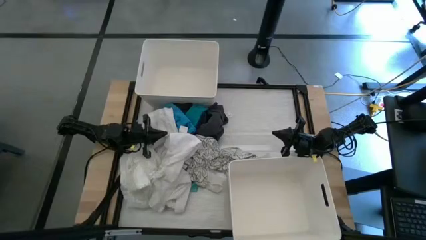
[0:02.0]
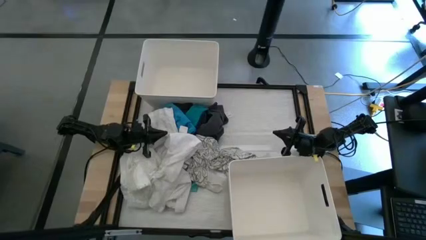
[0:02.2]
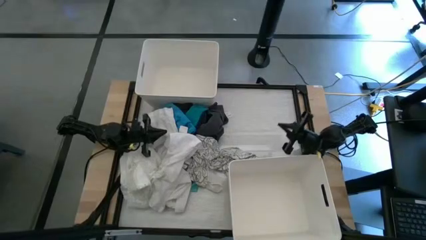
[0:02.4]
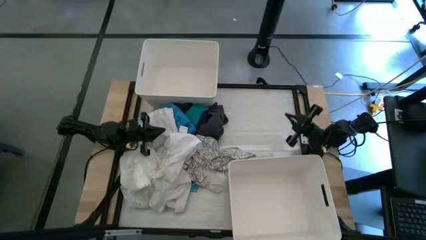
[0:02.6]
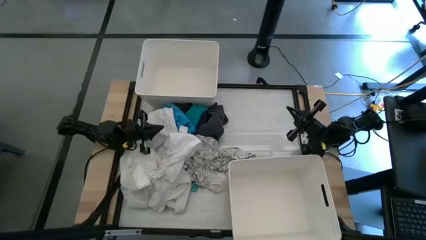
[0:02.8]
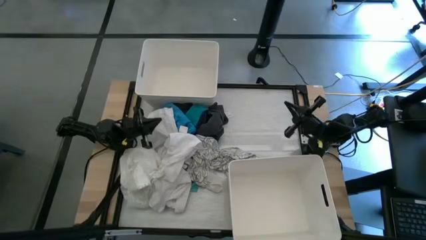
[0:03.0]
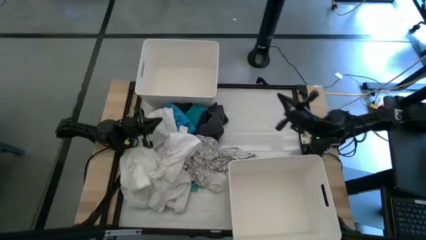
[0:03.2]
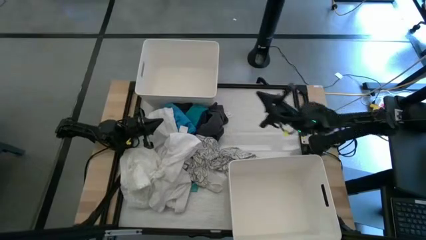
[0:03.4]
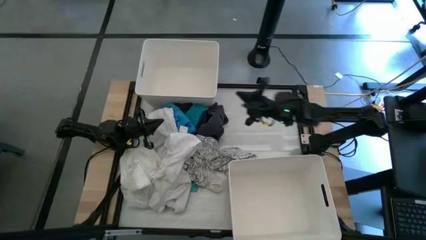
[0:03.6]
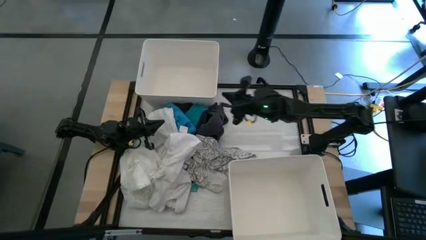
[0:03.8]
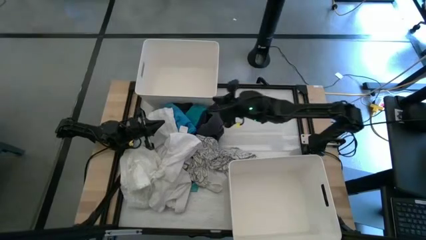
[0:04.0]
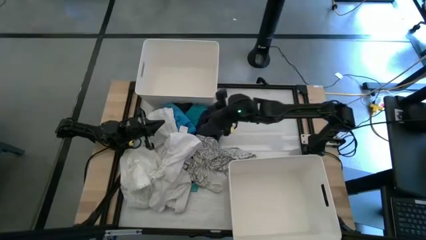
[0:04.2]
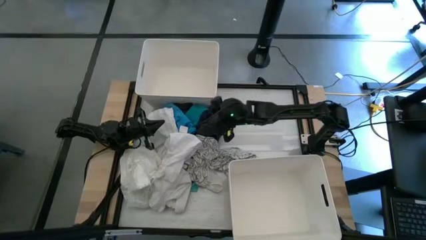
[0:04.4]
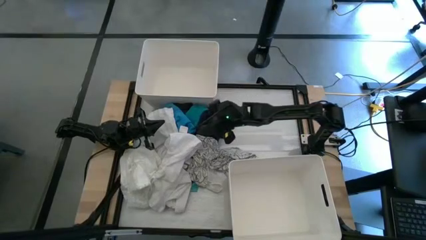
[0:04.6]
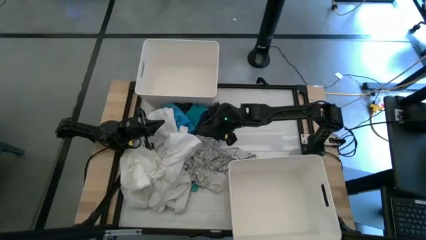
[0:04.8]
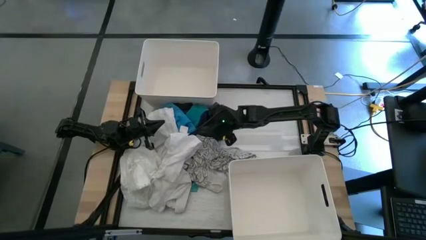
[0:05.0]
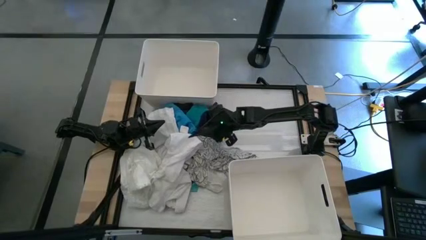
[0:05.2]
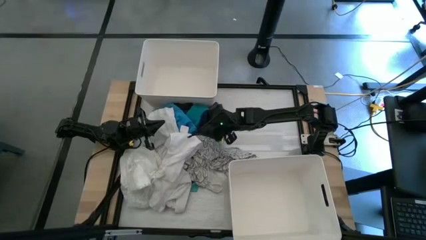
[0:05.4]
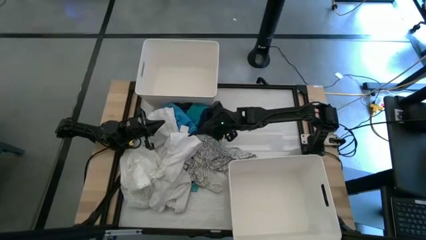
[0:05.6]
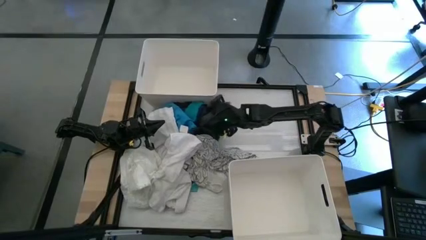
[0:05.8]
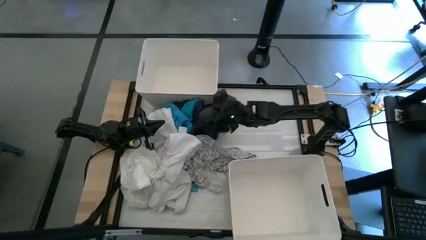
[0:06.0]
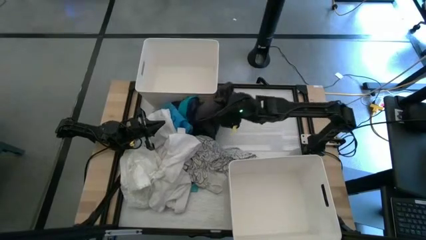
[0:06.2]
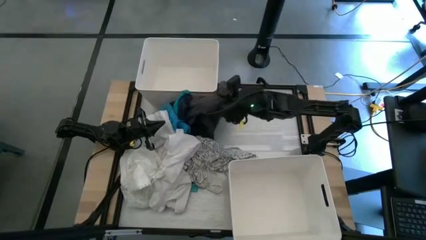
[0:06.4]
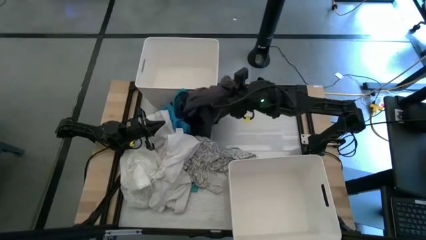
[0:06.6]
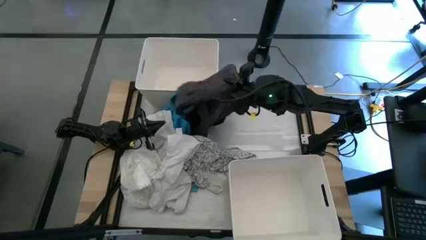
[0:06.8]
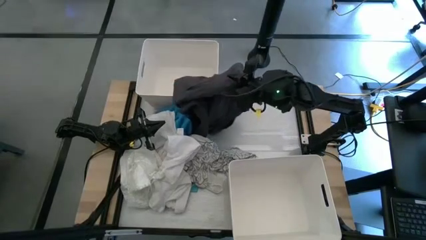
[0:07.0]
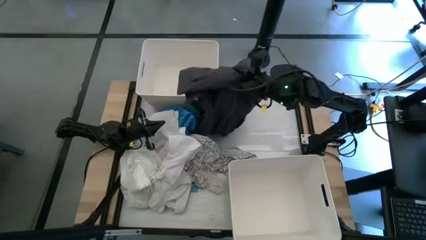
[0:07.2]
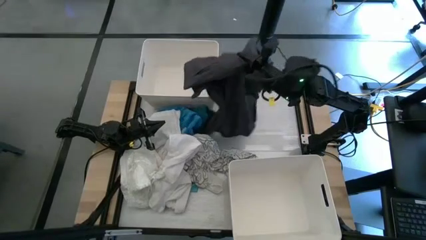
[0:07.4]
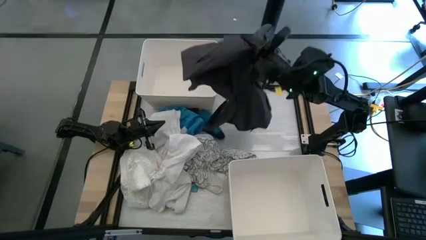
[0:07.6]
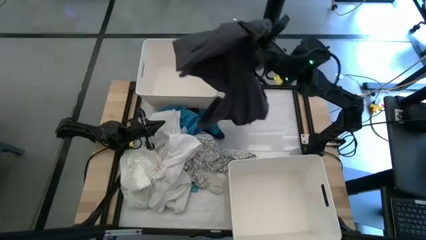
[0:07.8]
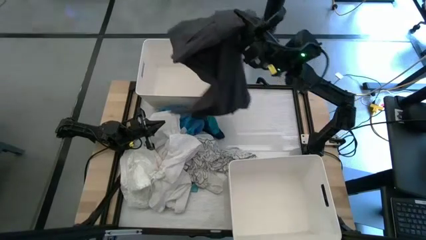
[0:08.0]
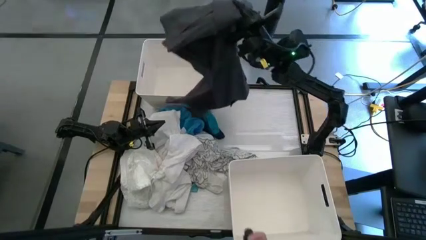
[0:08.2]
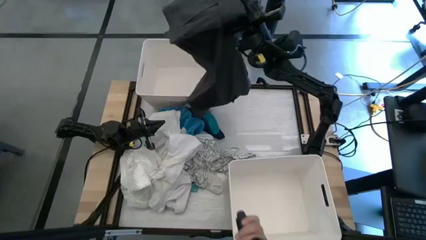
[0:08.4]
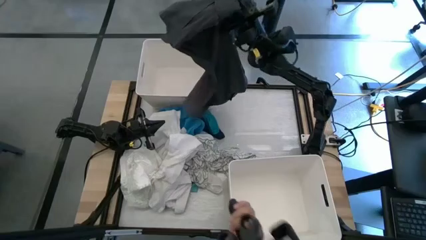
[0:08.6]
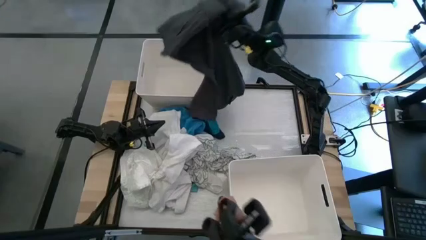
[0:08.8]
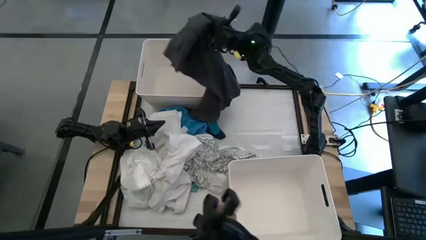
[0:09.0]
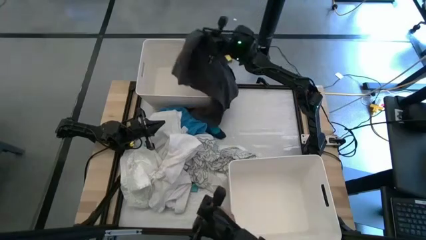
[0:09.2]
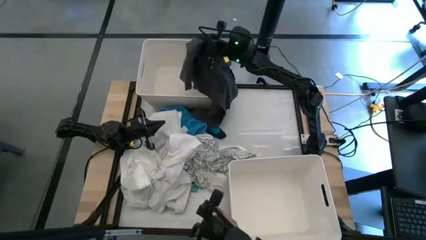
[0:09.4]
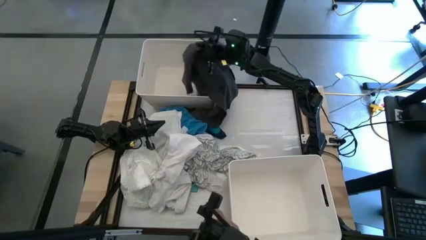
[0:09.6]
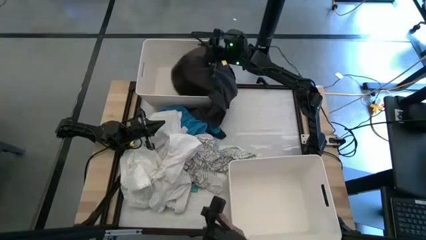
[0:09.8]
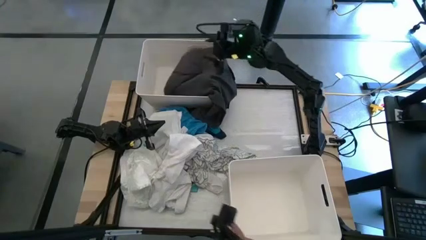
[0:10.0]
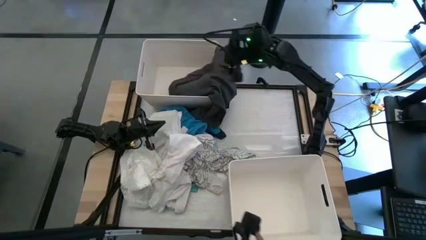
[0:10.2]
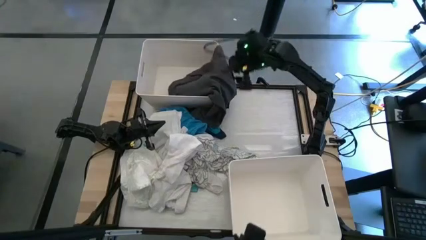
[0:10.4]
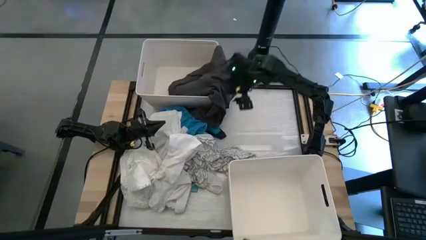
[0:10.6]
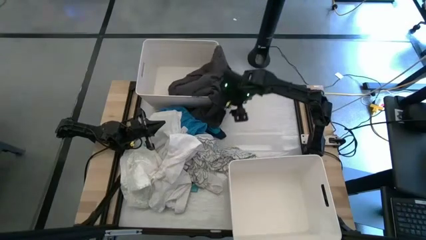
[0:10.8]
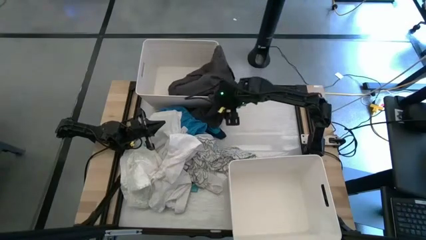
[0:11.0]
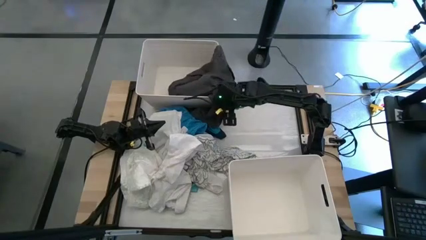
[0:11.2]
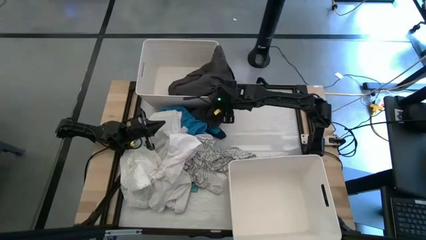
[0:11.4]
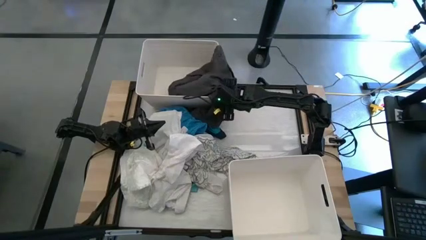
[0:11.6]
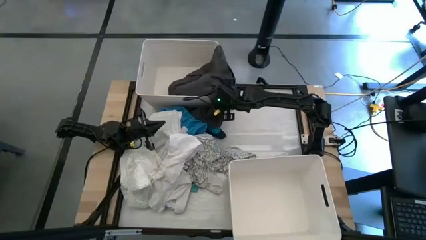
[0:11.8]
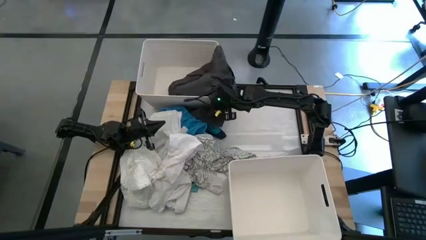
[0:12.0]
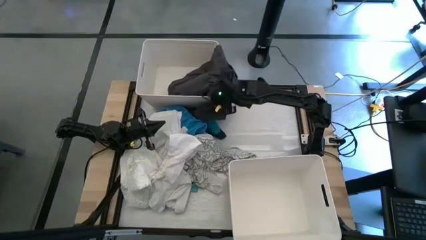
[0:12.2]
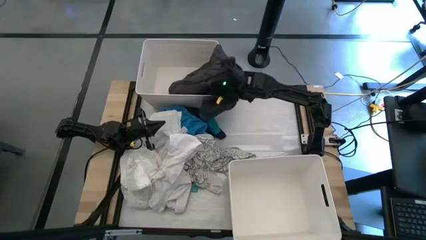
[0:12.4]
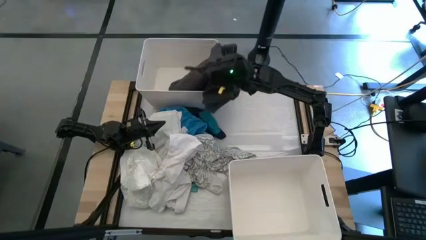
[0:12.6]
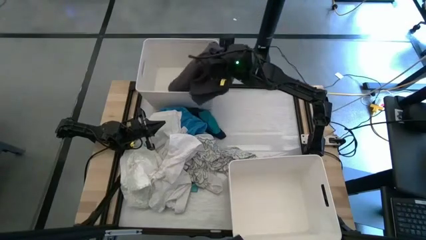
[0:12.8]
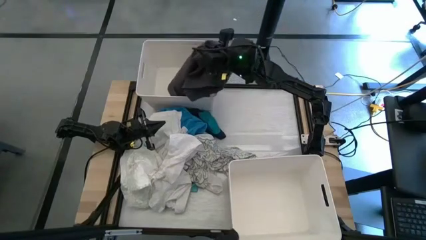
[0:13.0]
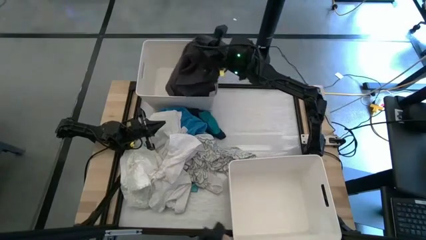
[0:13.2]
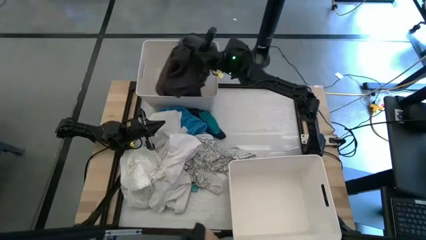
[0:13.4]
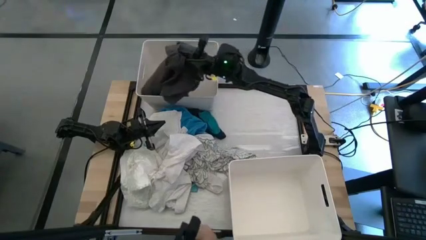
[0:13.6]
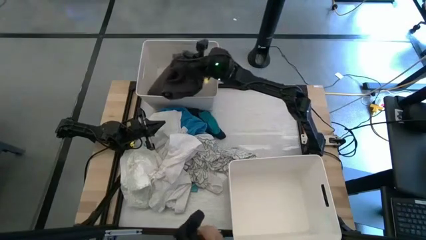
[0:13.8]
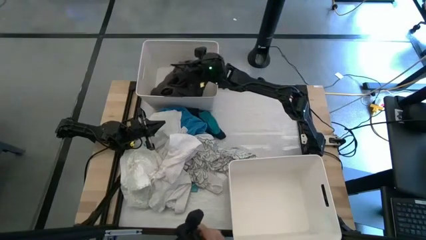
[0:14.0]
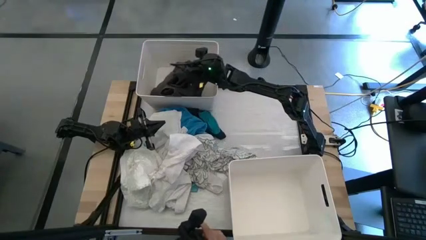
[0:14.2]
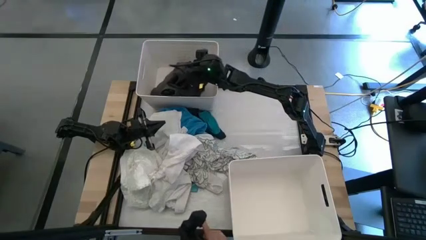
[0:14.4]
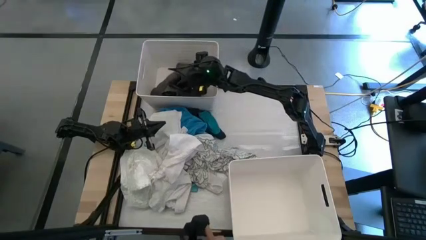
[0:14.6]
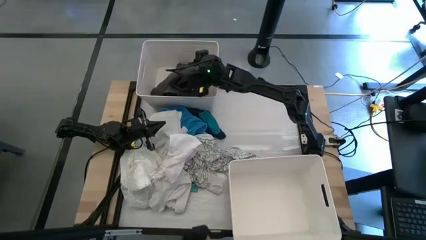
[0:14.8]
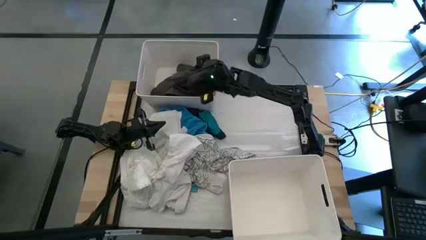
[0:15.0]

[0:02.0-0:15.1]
Task: Sort clothes
Put the black shorts into the top white laundry organizer
